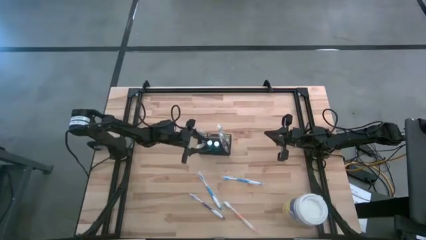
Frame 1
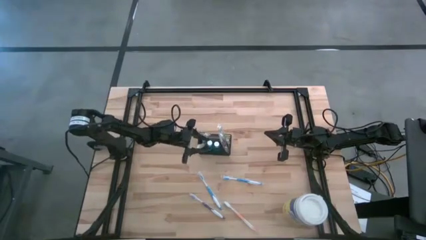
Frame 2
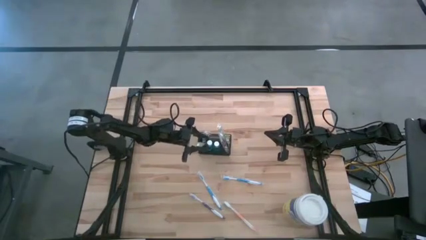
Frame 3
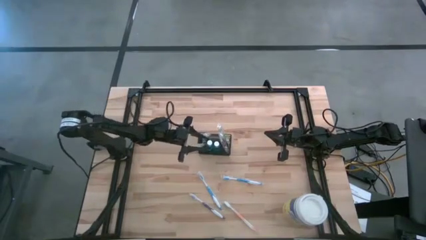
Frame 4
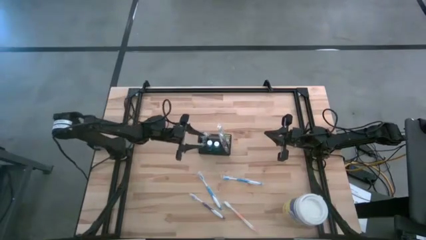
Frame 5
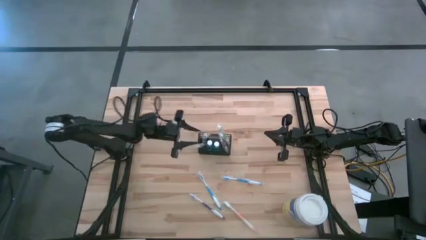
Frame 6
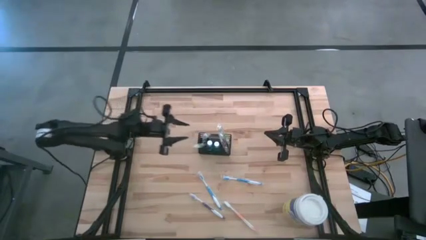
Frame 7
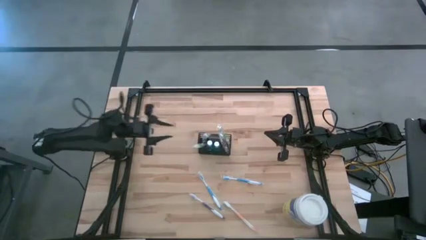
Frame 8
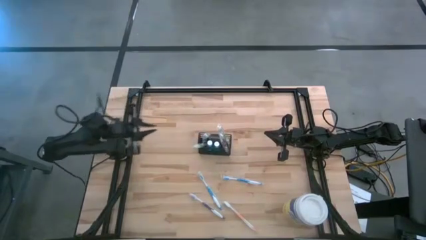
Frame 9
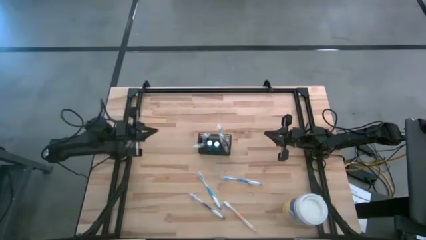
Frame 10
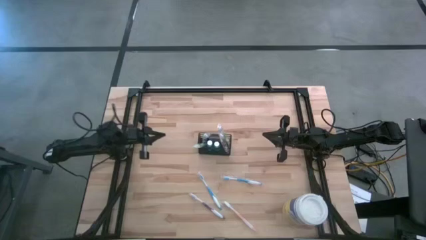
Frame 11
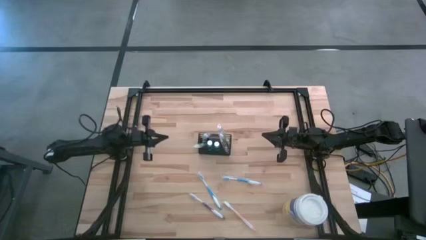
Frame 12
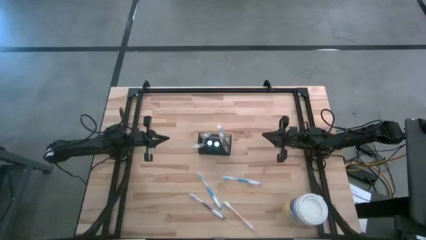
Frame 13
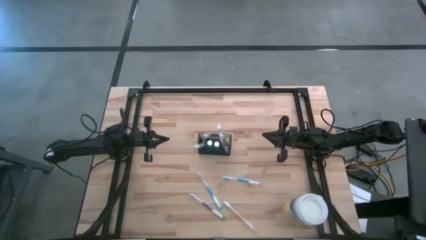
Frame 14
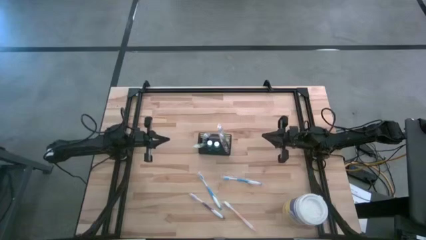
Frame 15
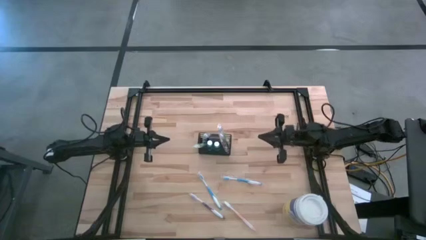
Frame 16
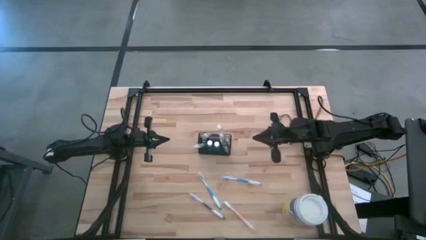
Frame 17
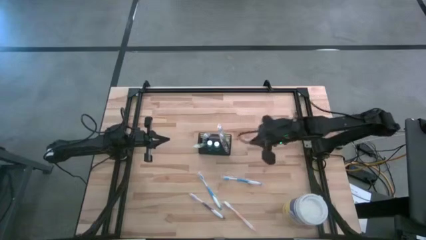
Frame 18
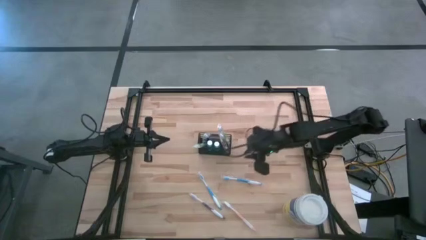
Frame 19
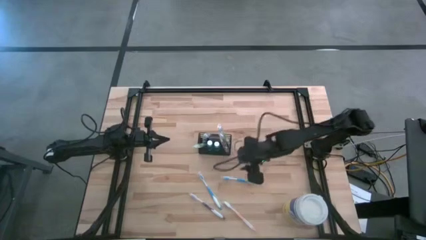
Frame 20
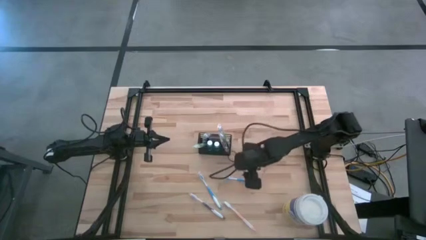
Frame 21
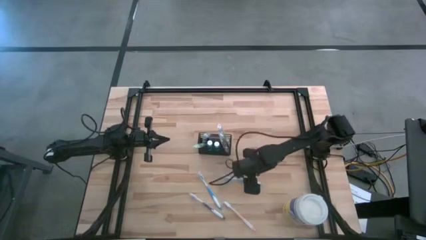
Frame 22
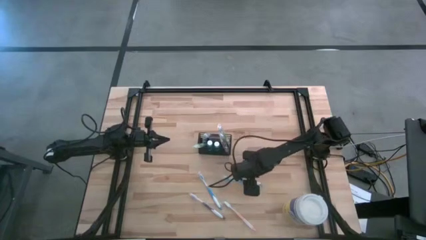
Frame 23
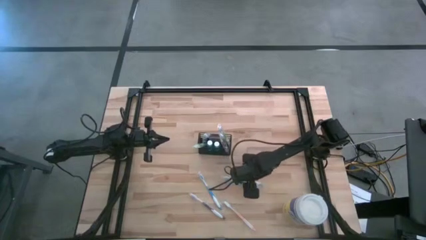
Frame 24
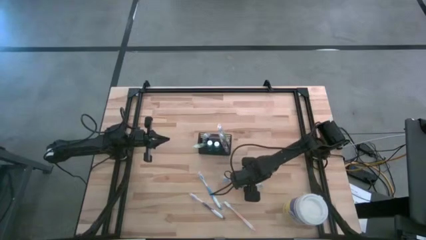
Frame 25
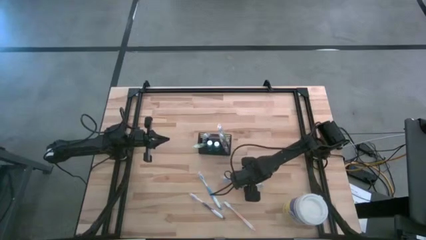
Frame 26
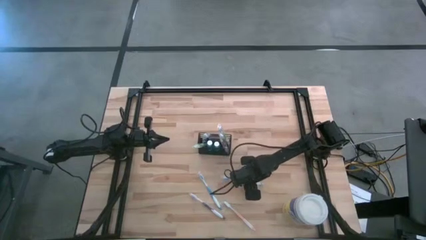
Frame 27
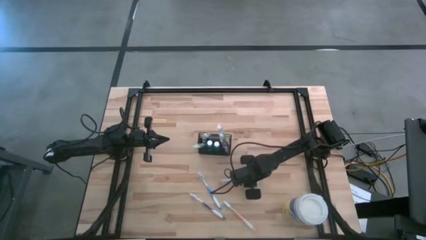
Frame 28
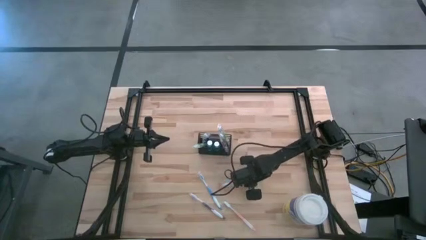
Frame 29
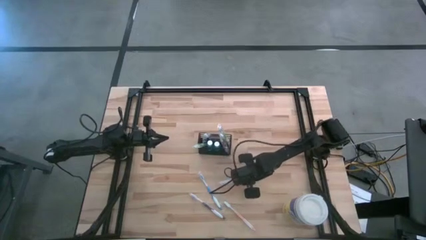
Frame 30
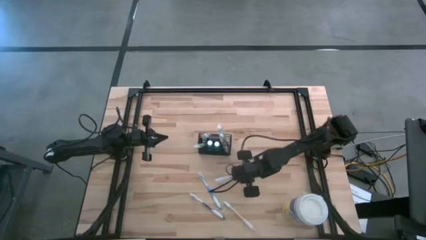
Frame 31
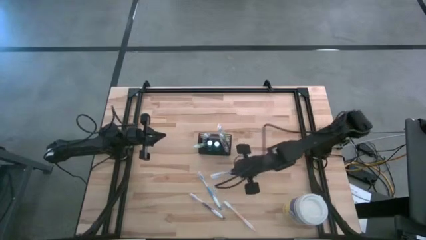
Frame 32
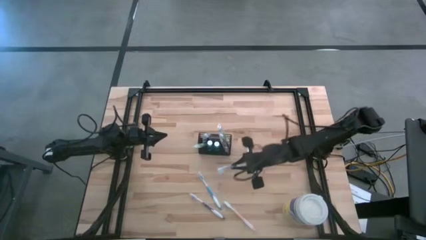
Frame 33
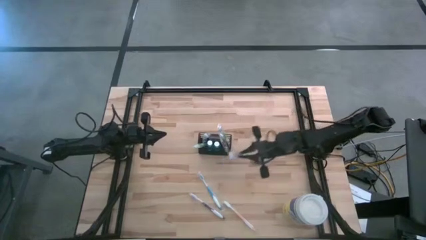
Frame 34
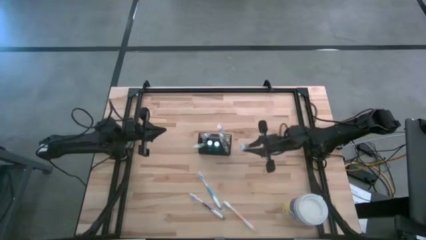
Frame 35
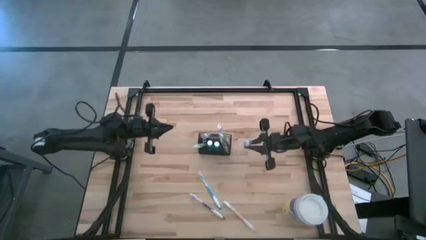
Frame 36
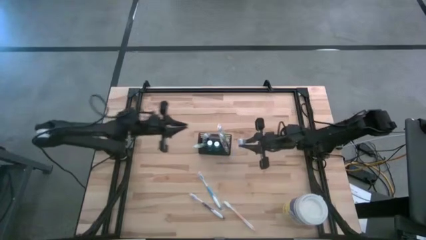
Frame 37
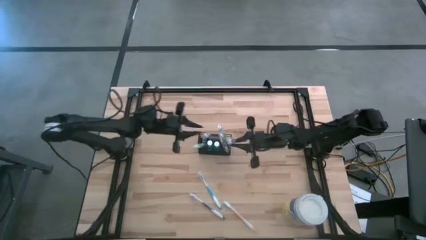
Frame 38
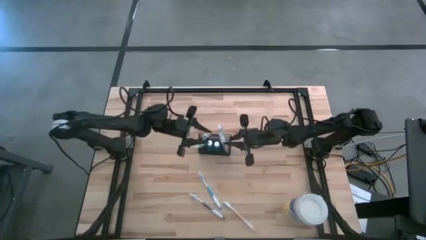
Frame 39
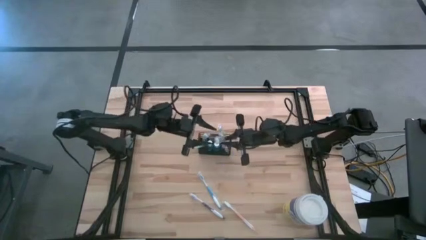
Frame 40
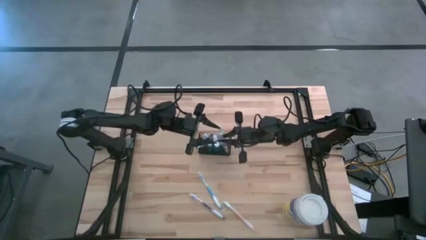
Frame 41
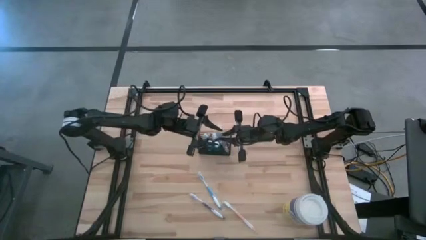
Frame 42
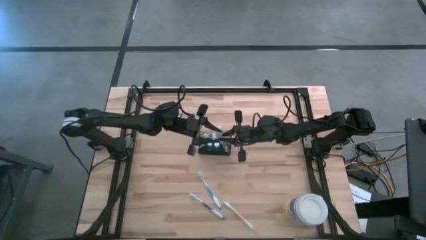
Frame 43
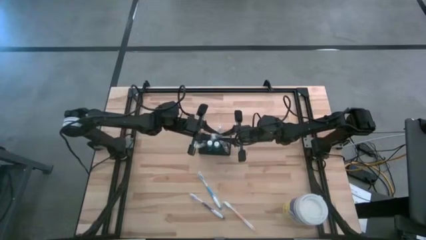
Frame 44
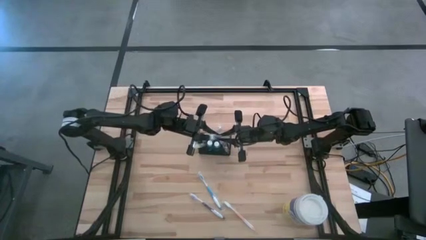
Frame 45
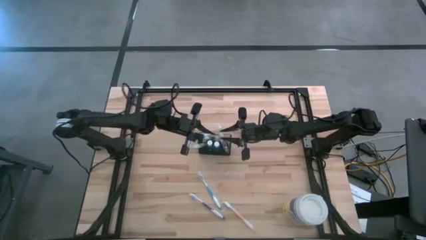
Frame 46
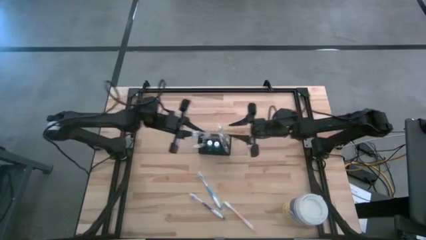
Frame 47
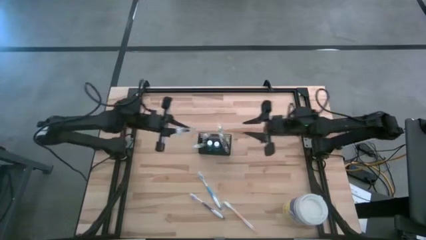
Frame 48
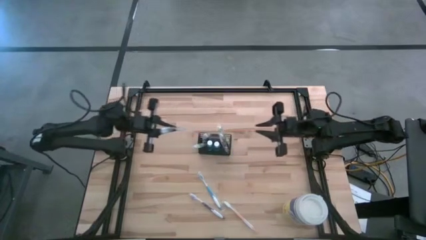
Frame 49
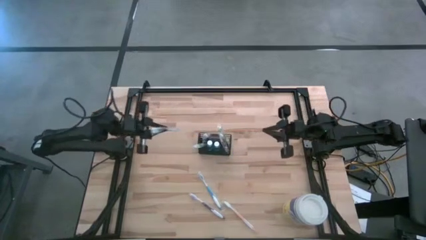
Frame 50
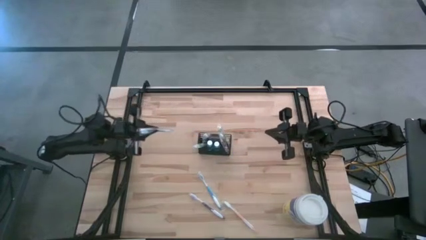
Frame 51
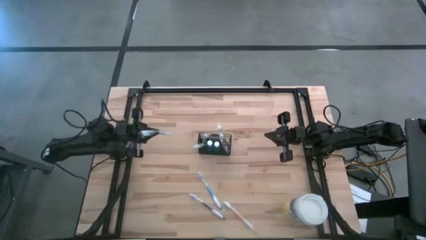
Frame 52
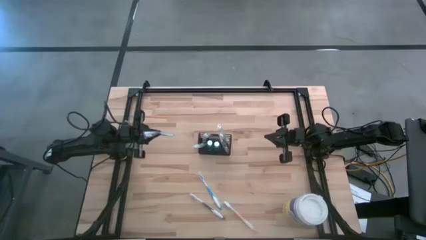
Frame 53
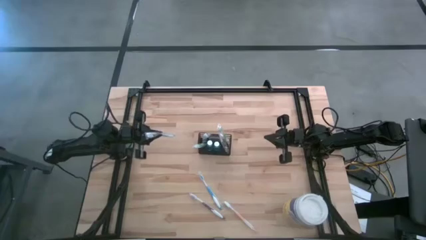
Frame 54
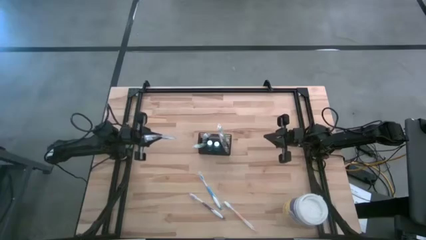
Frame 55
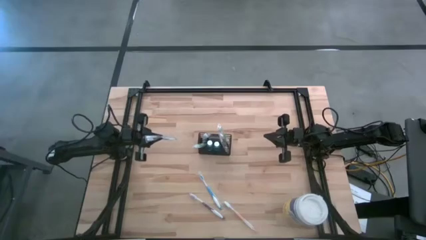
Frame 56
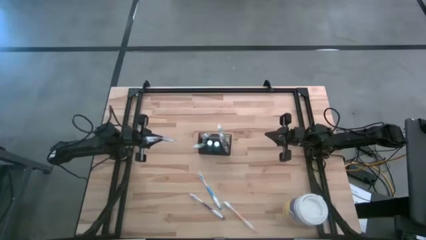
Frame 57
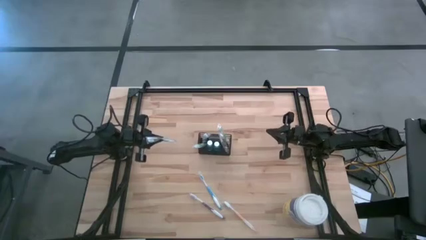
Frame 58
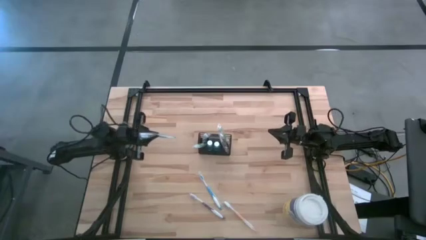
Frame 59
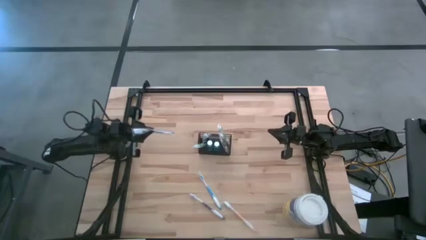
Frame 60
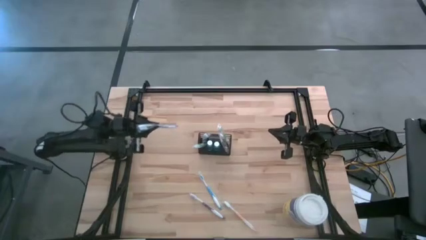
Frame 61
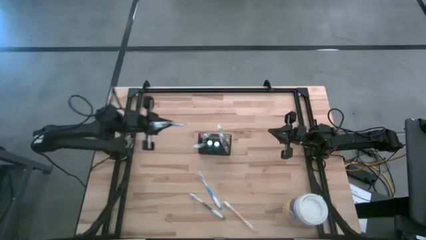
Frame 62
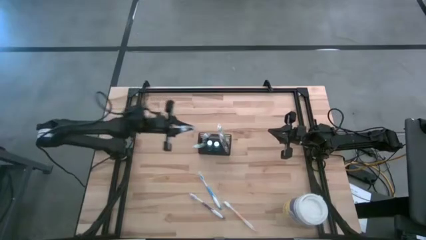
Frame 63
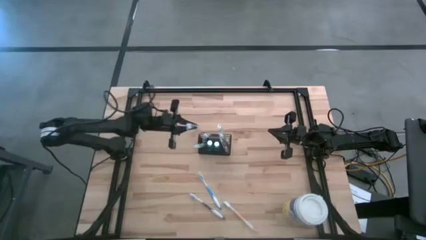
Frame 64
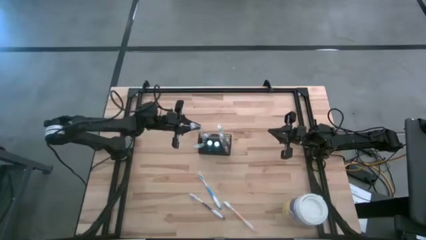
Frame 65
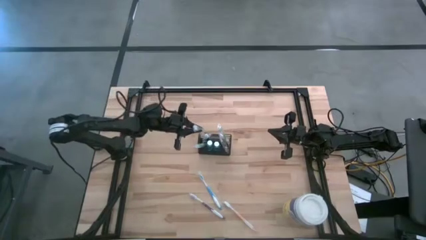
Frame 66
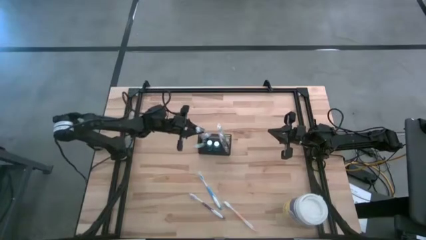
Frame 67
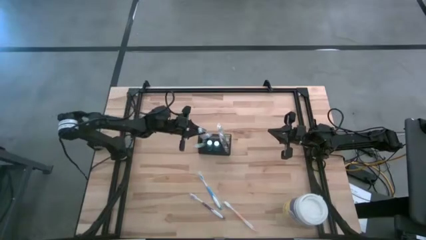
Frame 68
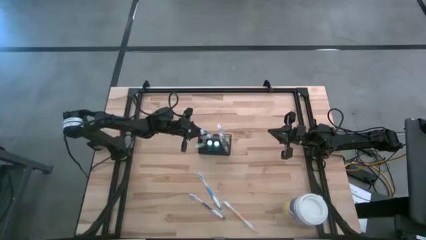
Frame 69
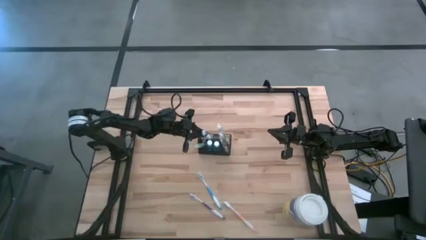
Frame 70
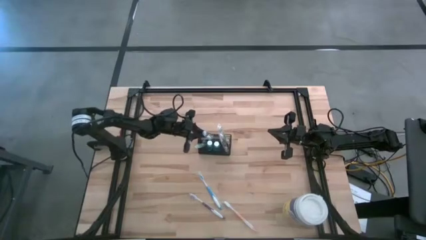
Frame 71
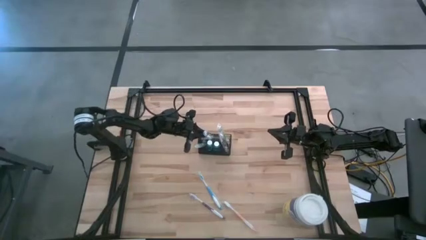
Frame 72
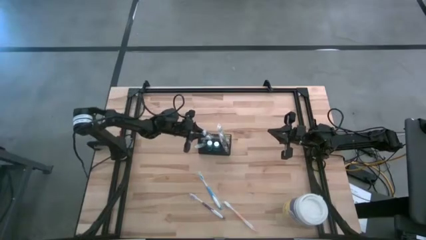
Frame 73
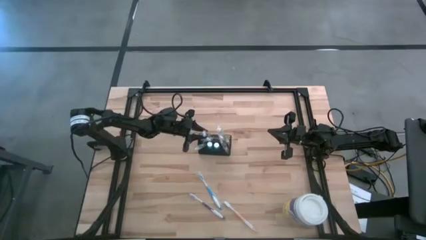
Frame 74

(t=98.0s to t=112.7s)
Task: Pick & Place toothbrushing station
Put the right blue toothbrush into the black wire organizer
